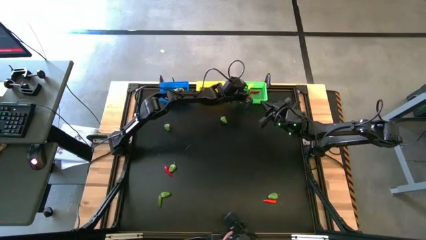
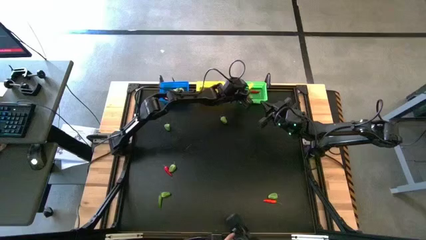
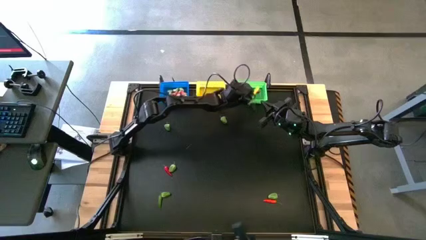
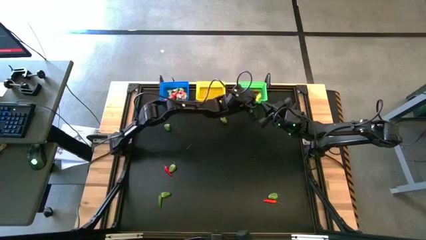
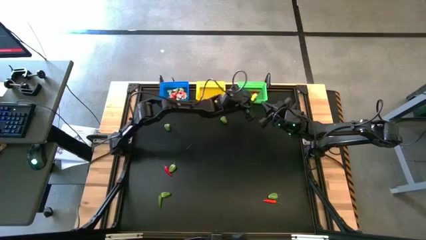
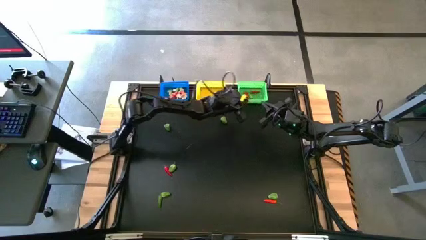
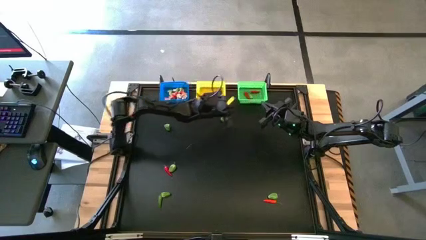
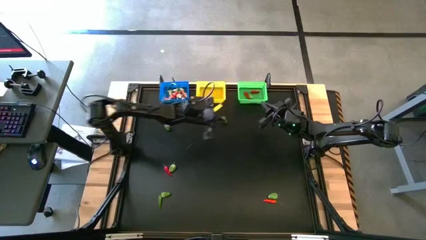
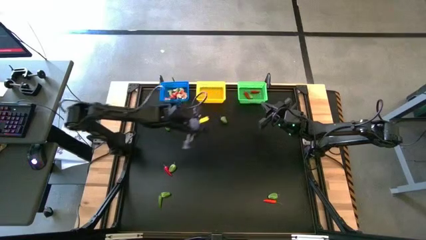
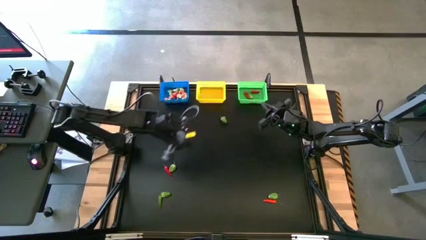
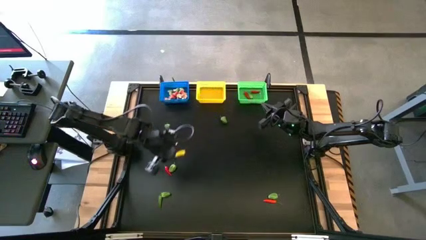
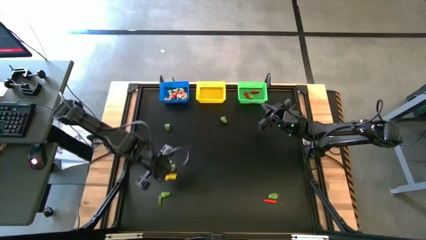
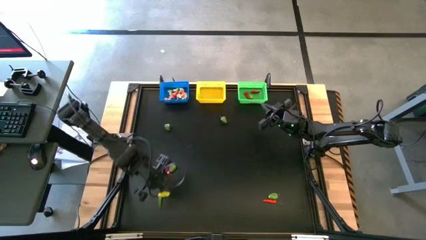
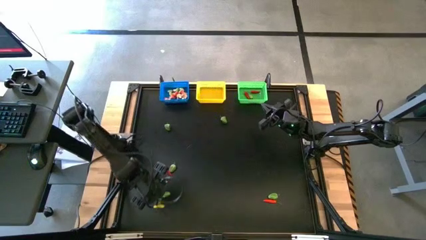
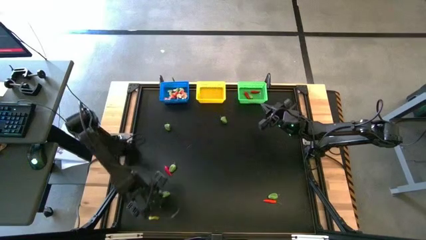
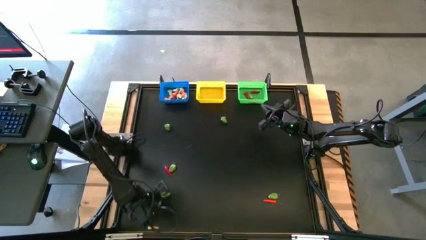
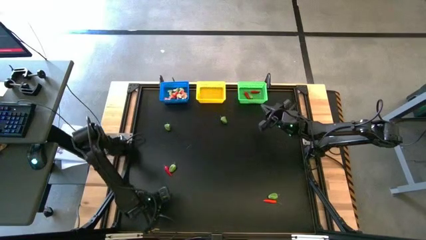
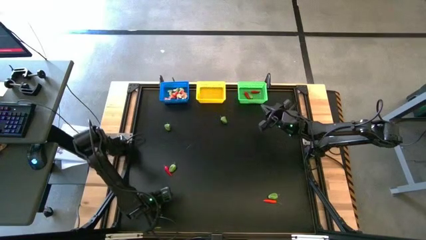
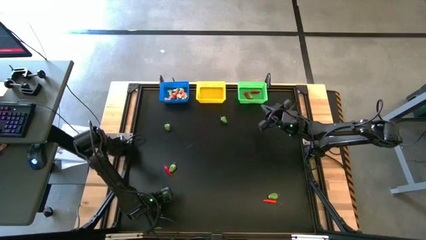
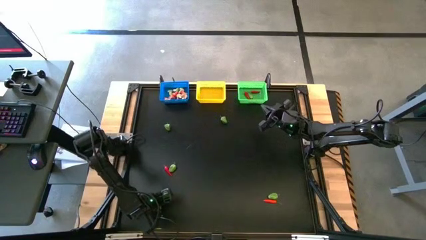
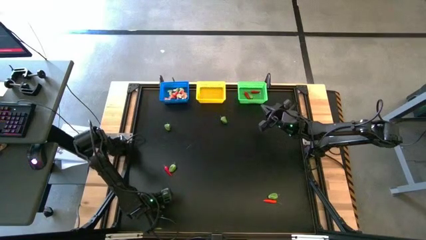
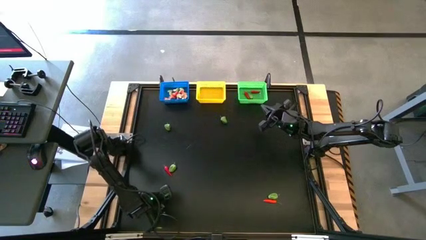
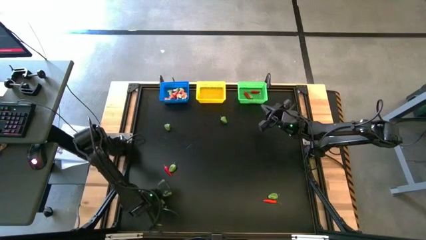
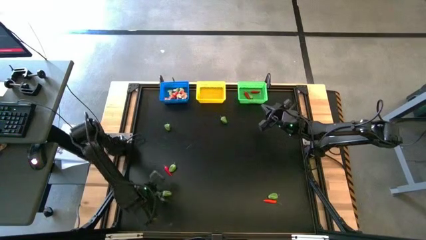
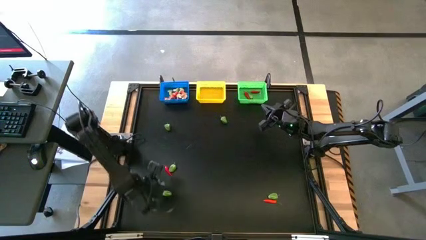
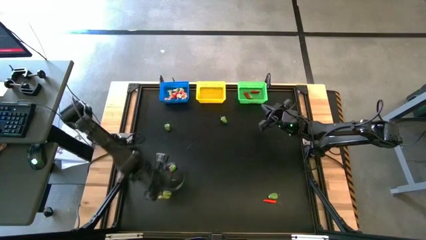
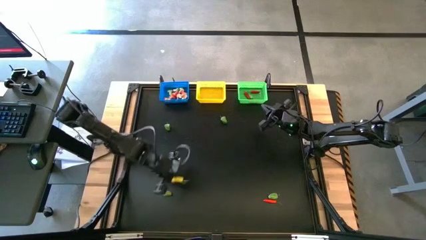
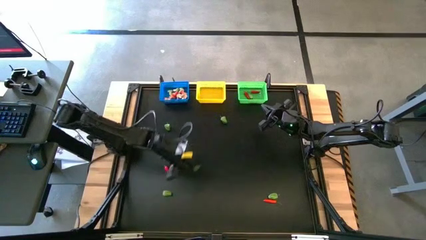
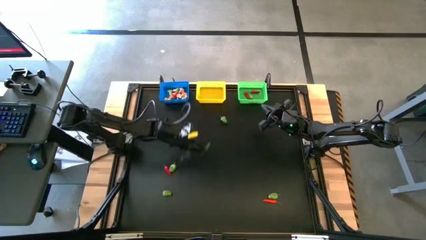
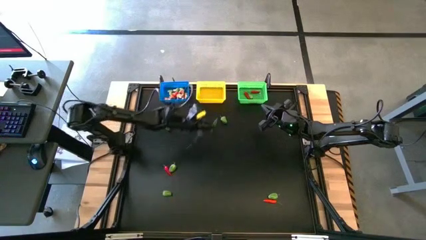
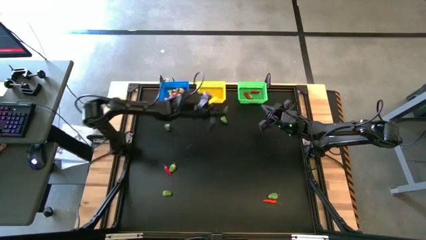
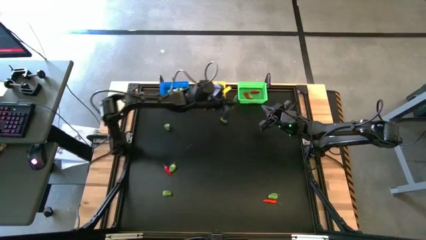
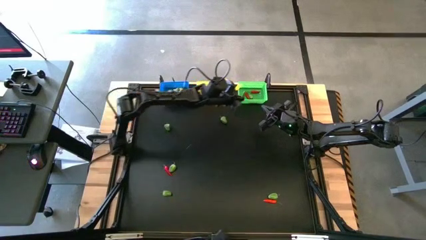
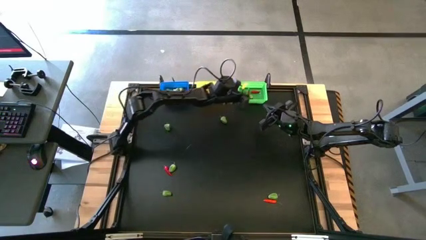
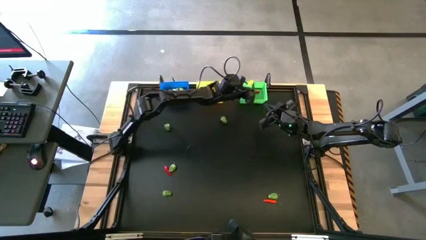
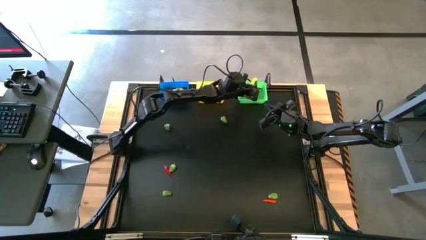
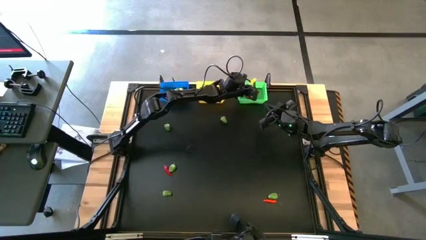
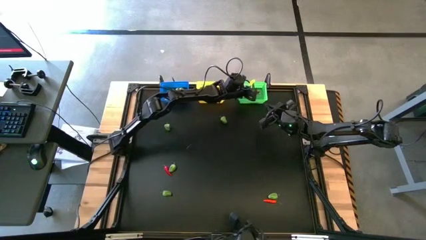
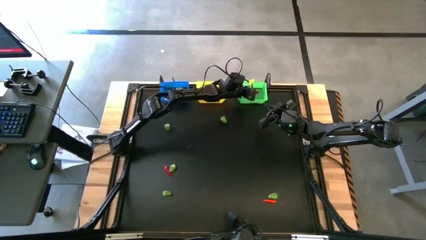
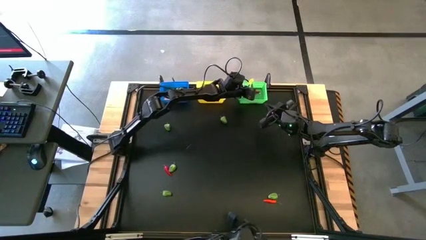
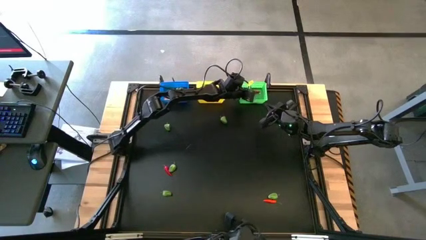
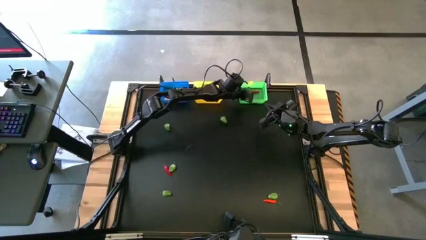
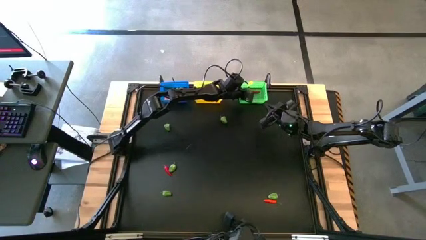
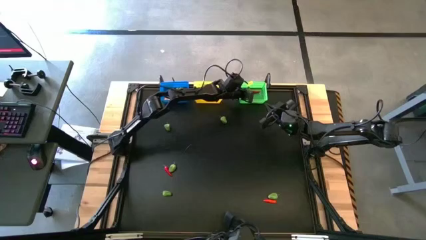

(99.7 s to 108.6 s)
Task: Sort produce into baskets
Put the green chili pepper into the green bin

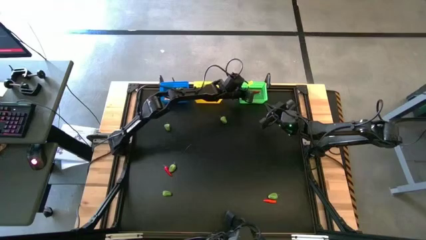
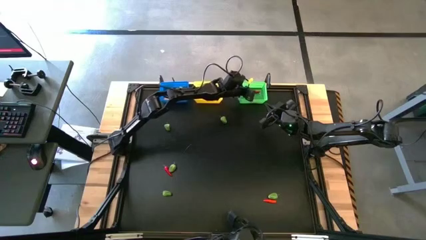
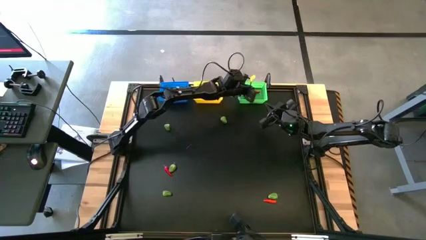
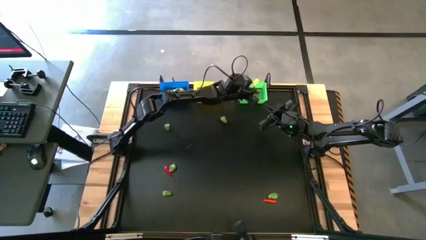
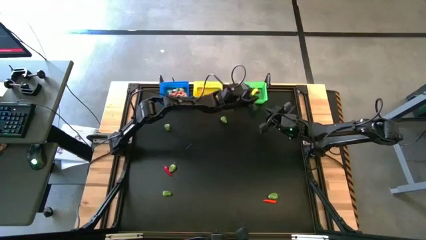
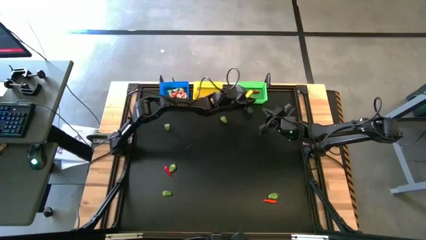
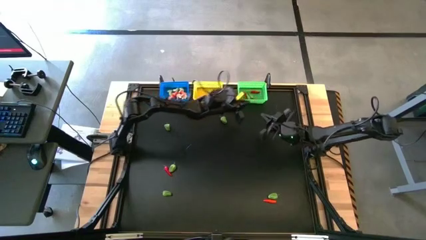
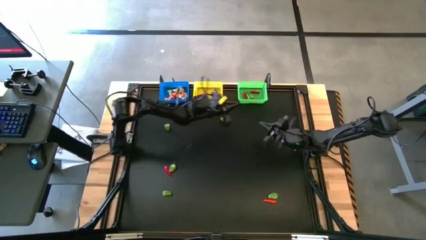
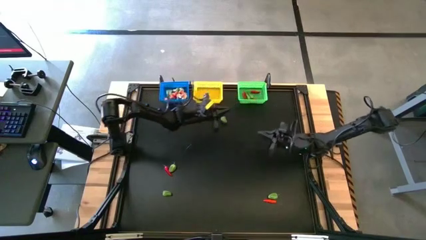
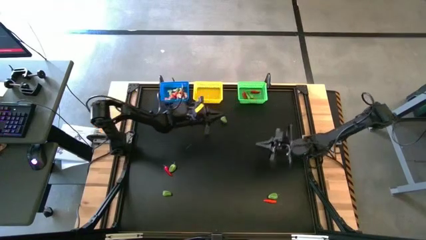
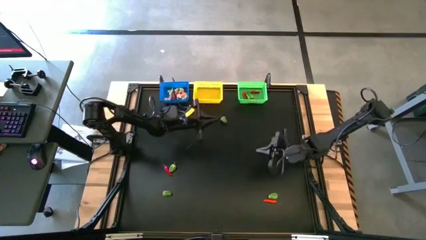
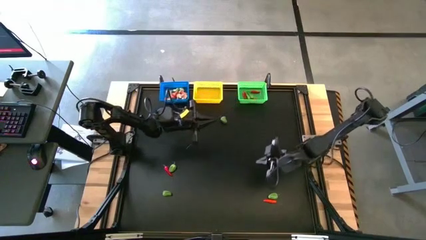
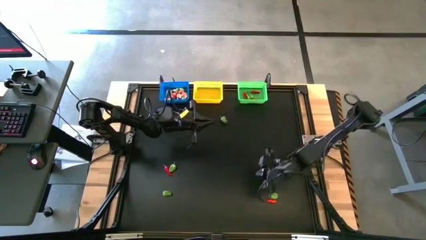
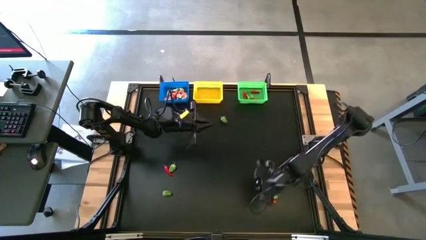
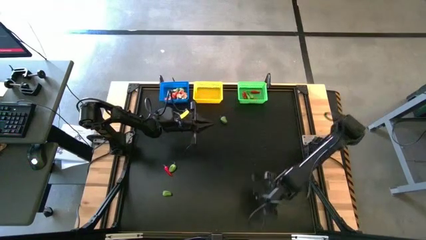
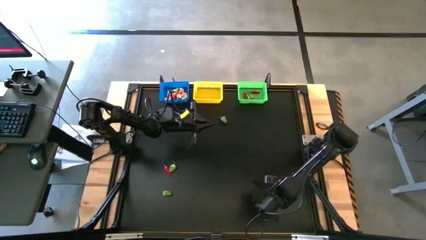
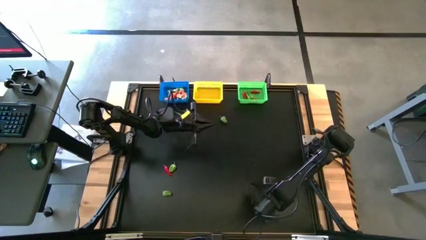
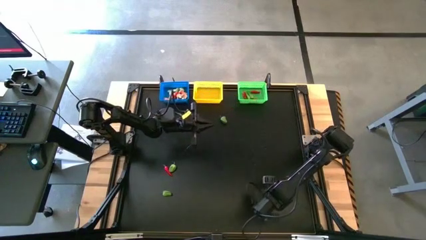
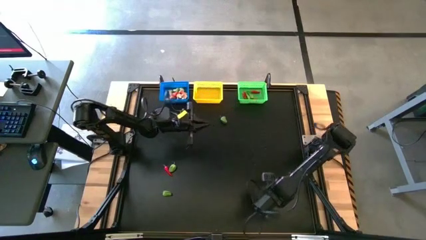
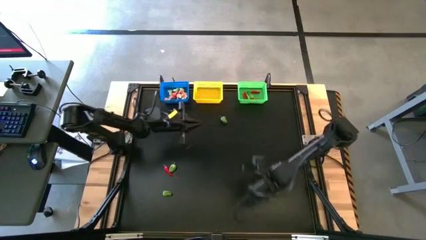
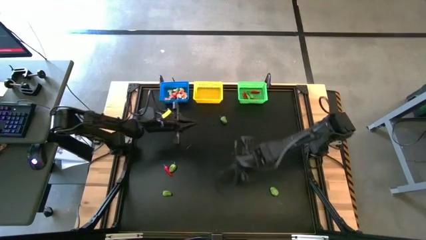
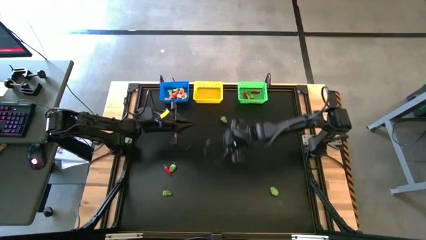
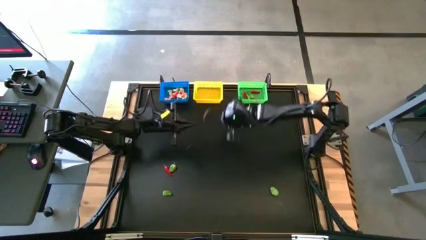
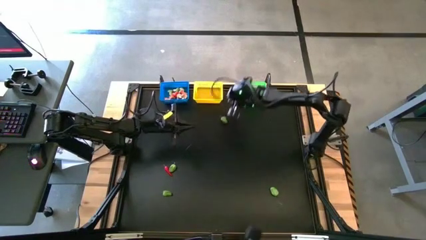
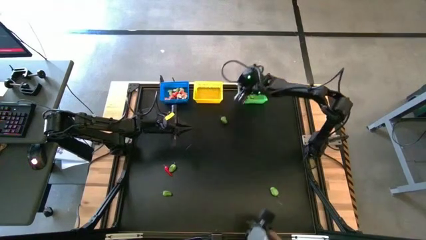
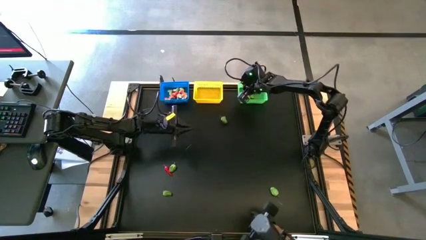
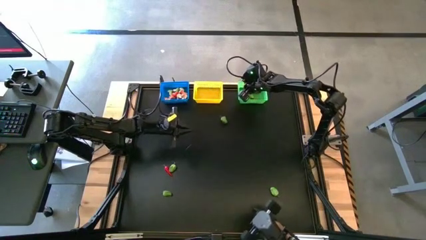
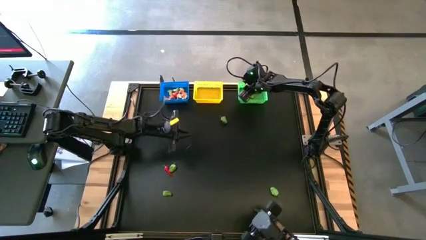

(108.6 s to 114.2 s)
Put the orange chili pepper into the green bin

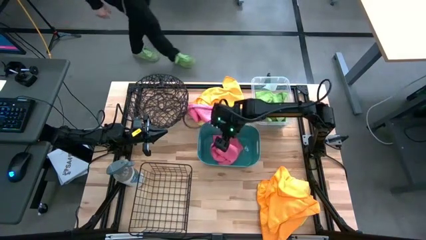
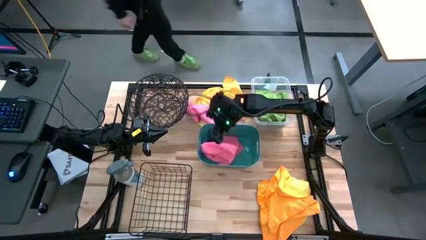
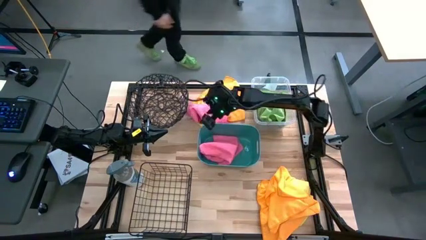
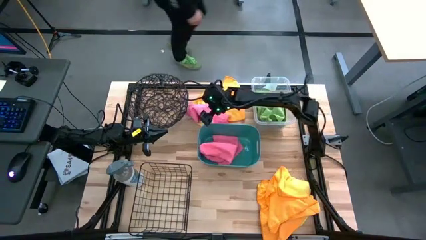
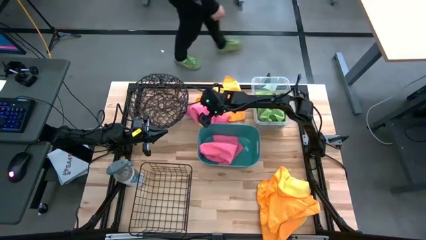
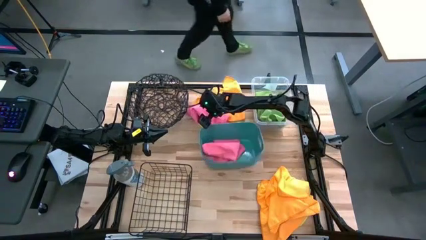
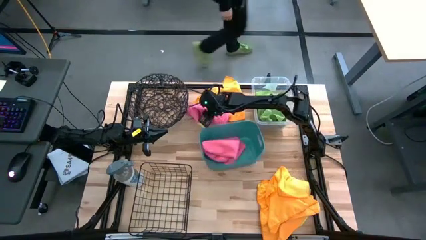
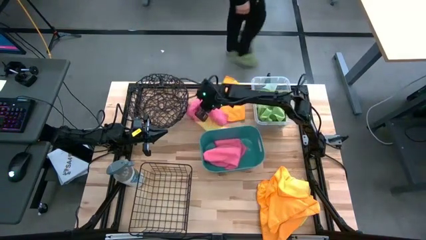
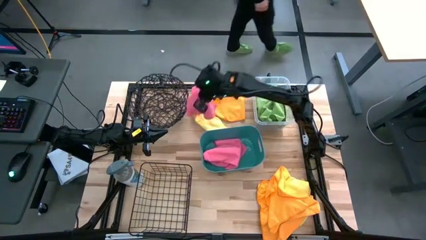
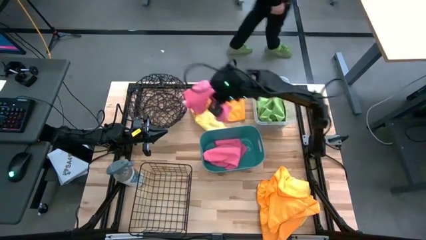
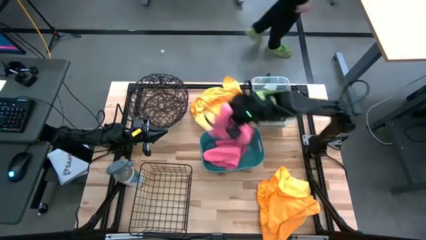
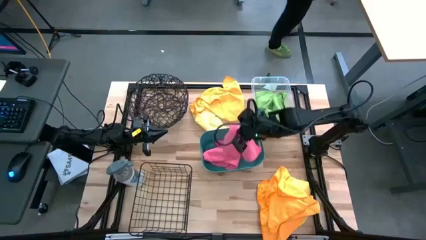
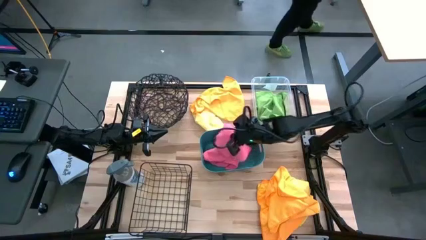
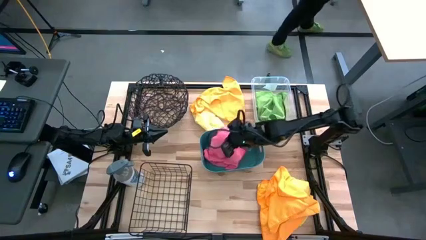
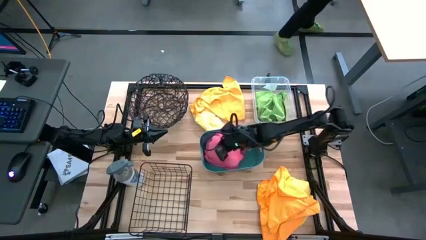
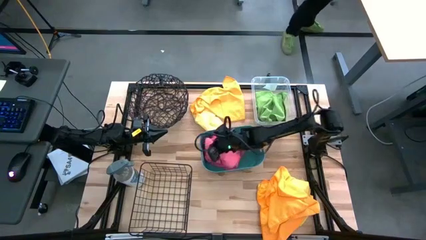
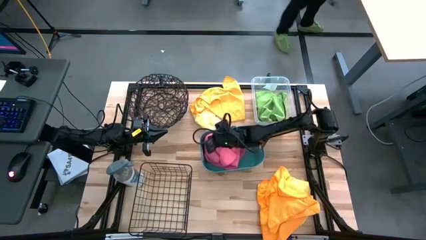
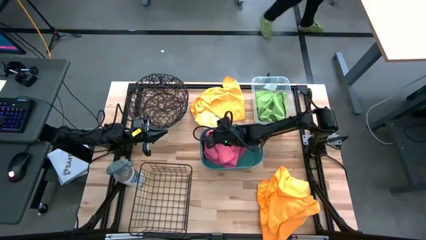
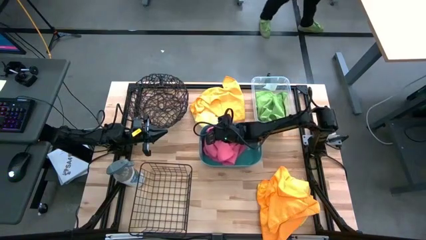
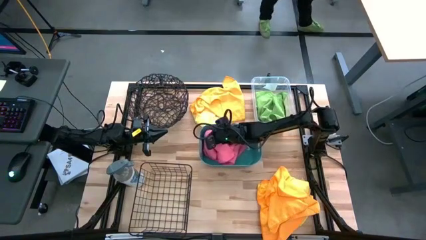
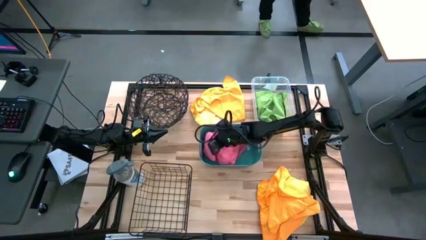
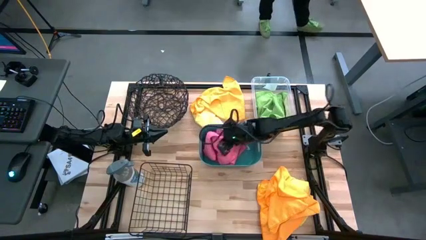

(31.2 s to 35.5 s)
Task: Sort microfiber towel by color & place in baskets
Put the pink microfiber cloth into the green bin
